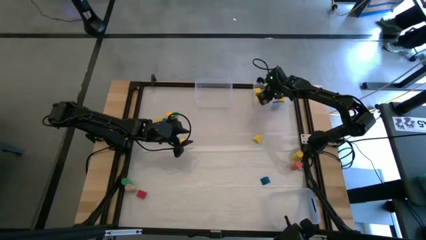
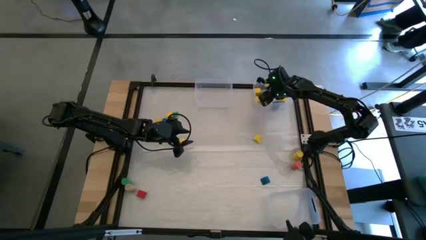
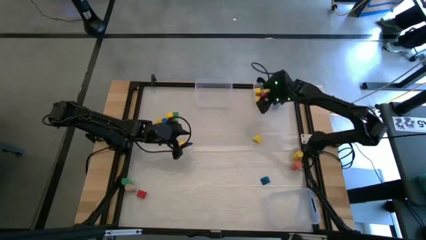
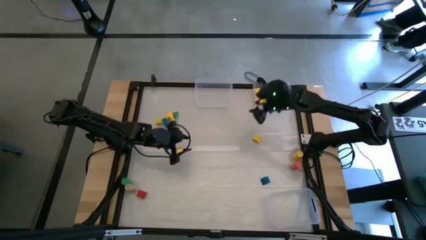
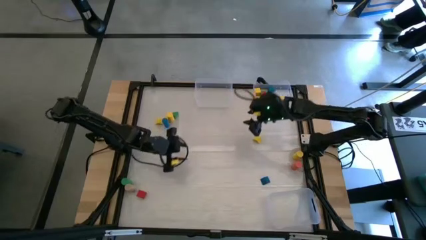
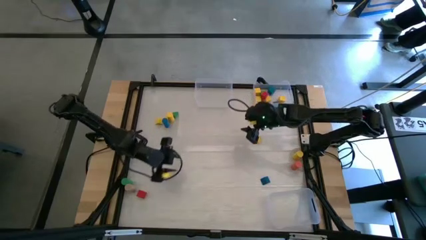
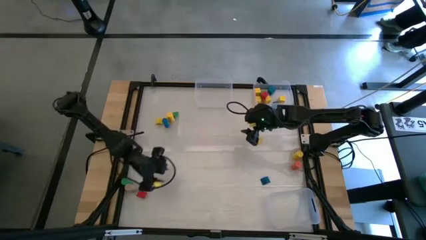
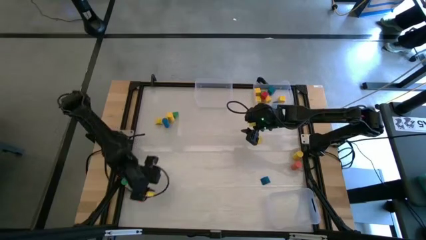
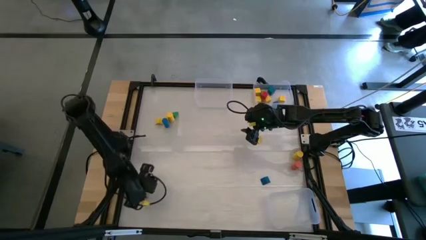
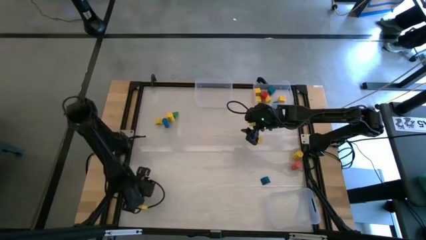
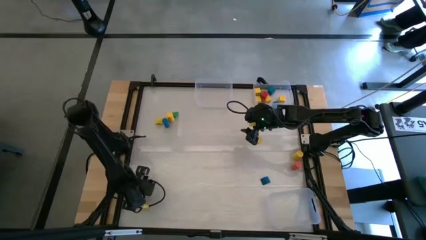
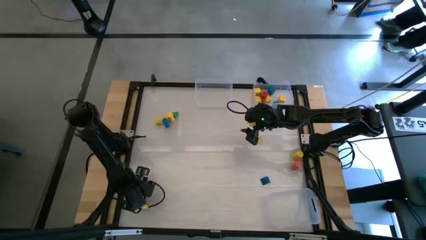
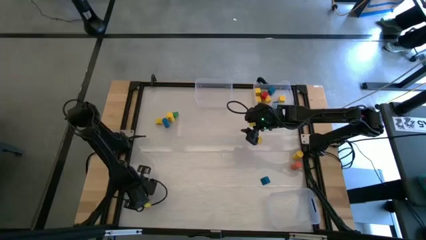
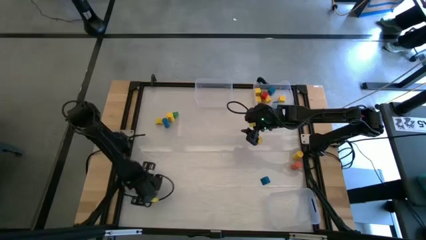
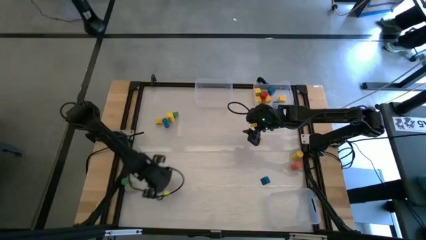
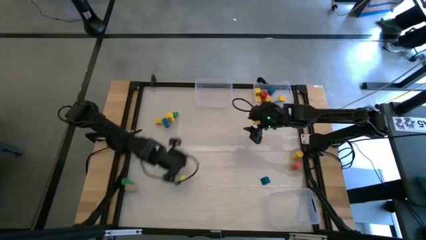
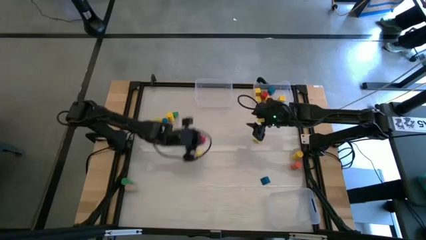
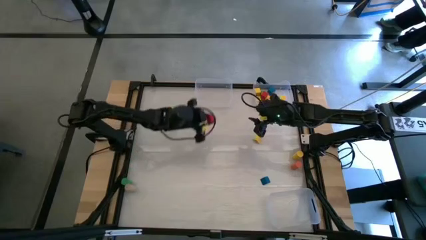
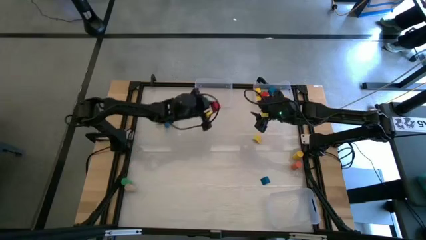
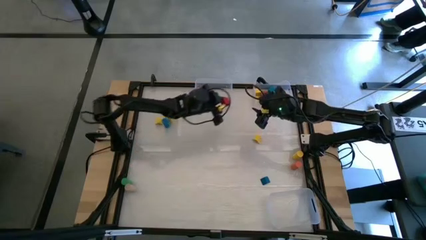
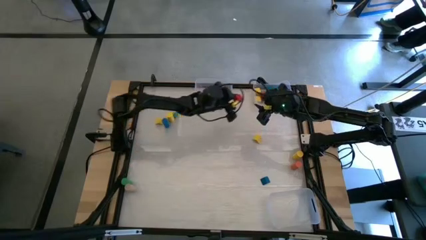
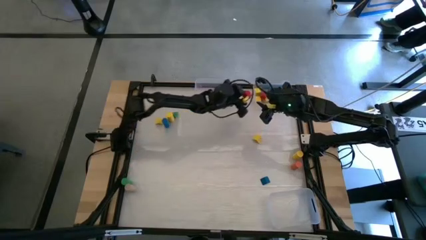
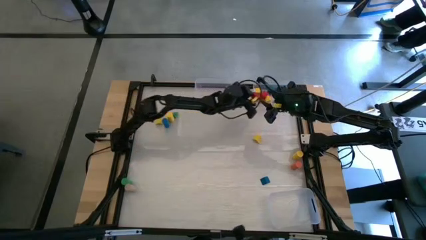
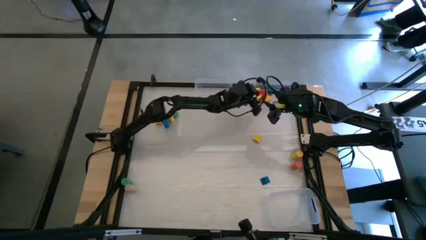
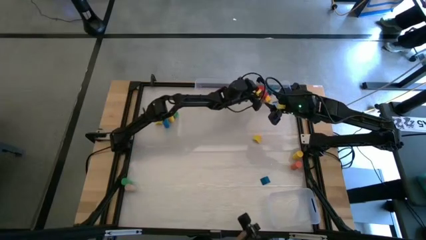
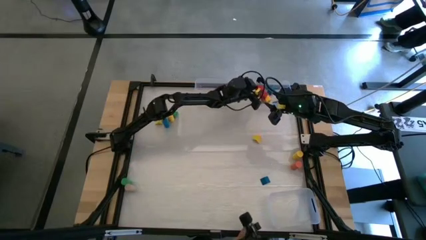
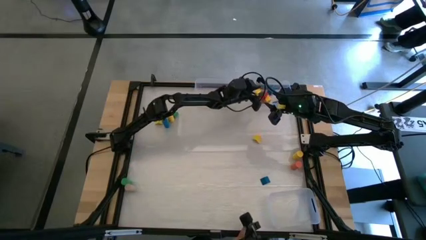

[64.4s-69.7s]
Task: Sort blocks by size
Put the red square block into the top right transparent bin

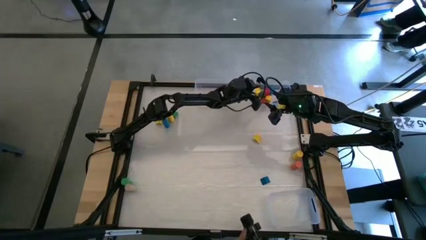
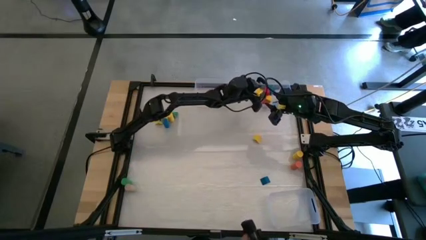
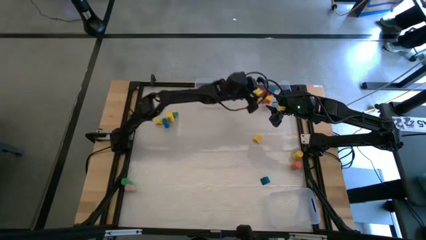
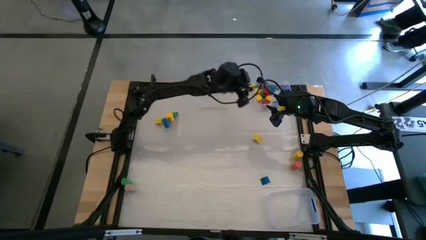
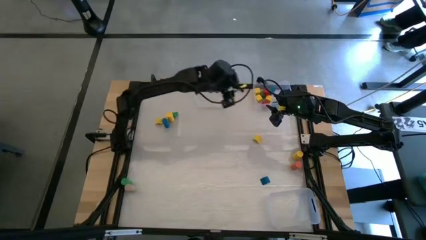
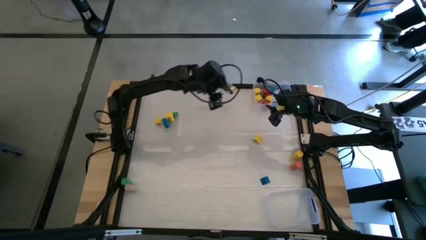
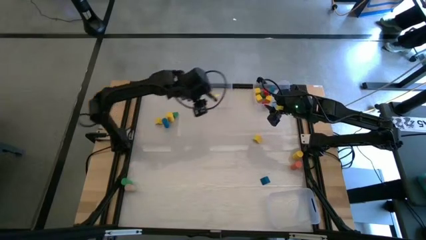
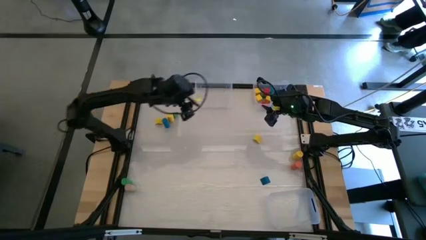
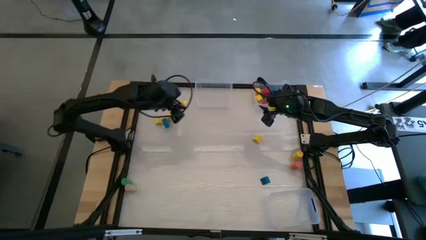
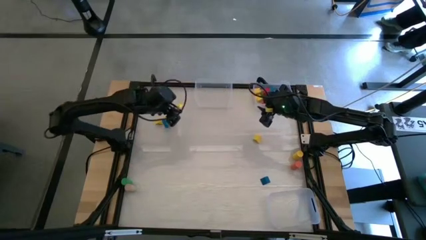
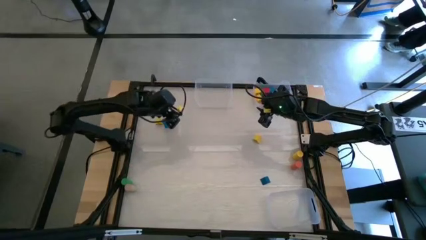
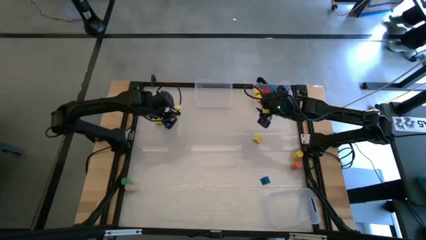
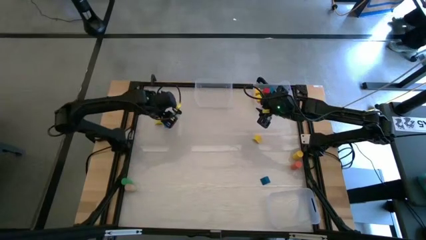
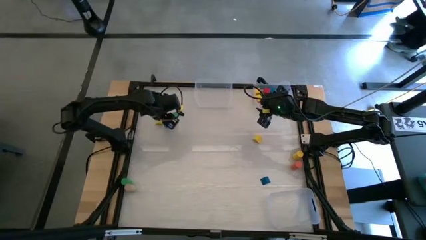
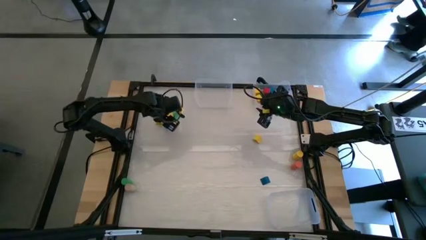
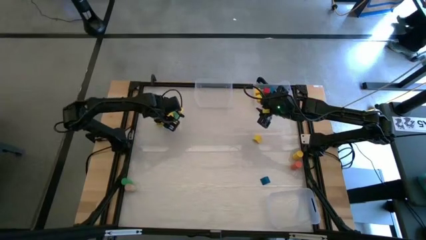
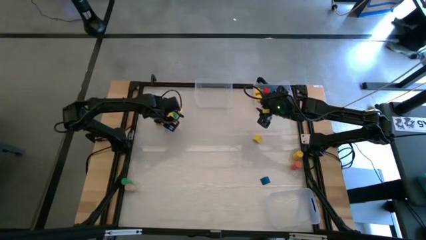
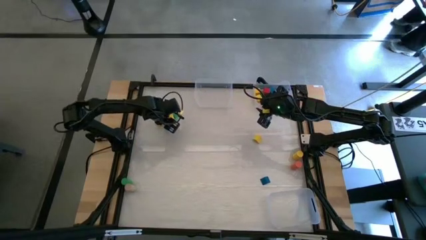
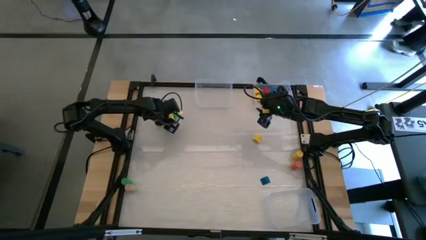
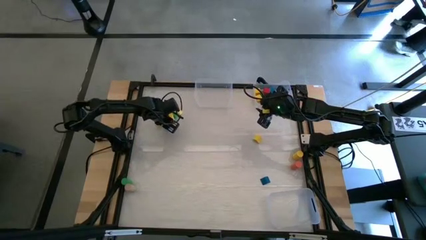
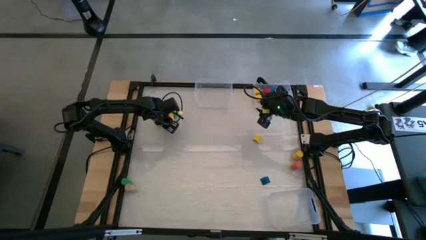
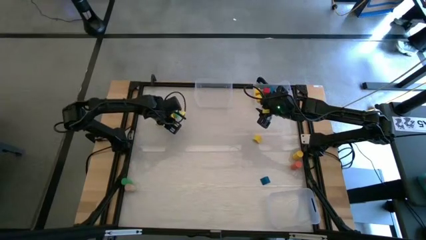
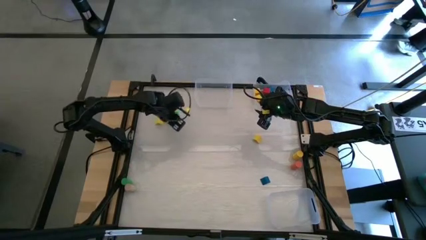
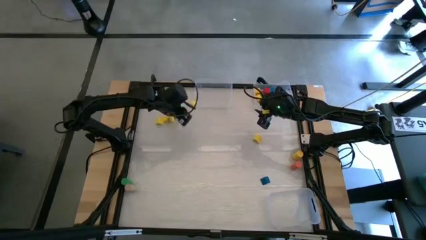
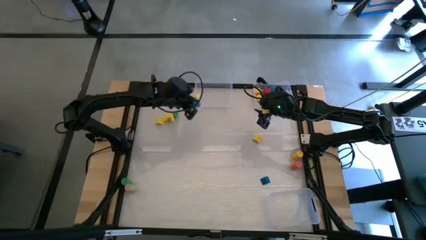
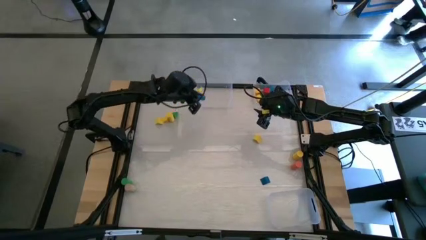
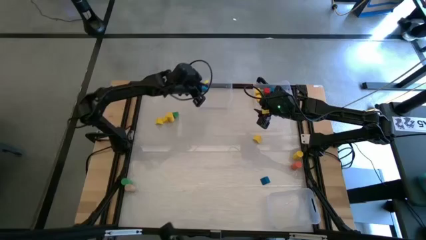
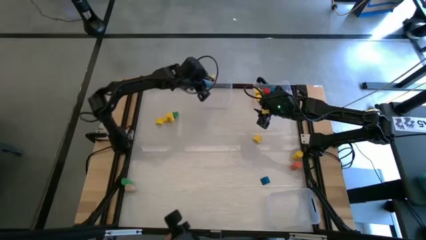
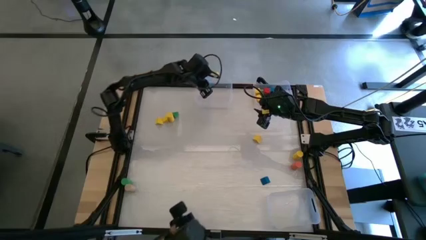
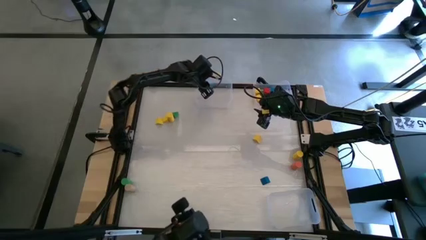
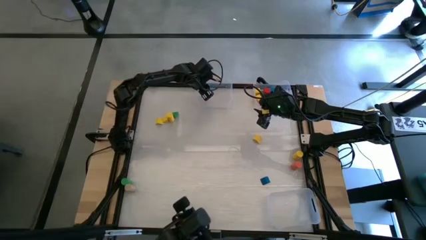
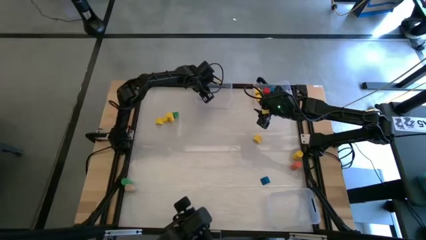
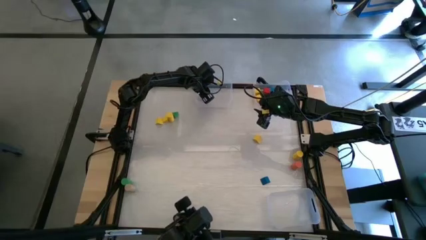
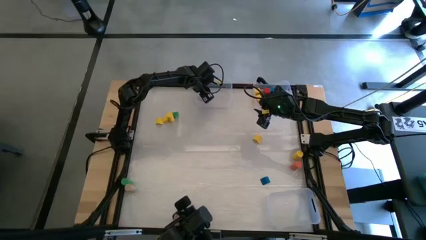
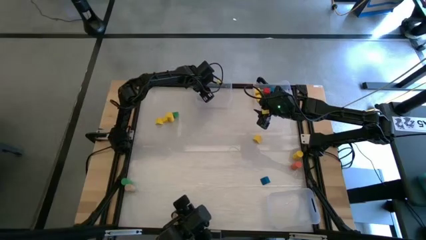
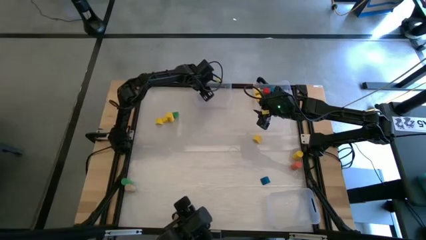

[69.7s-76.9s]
Put the blue cylindrical block into the top left transparent bin

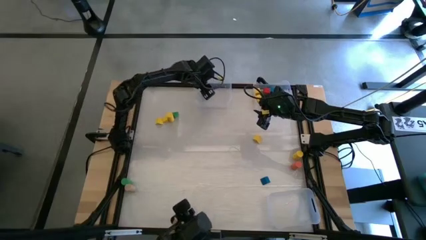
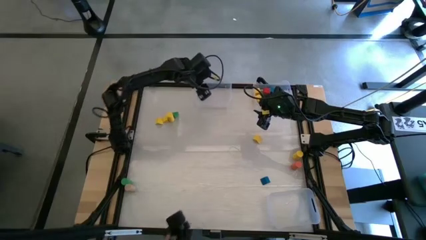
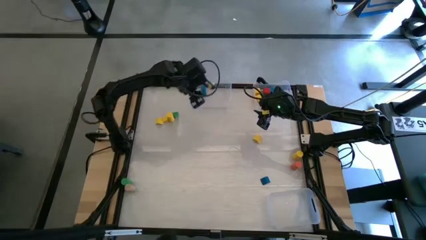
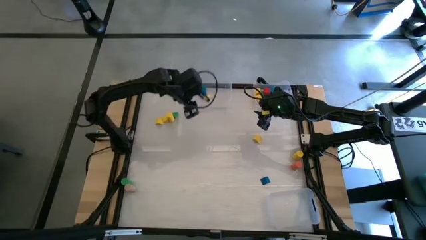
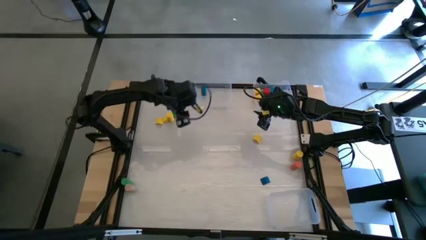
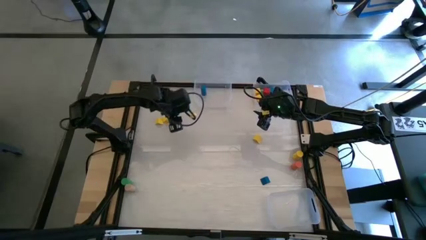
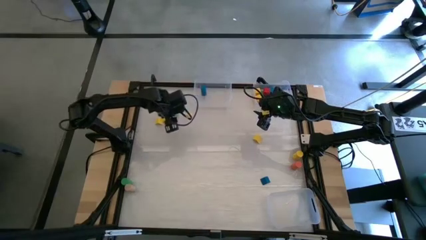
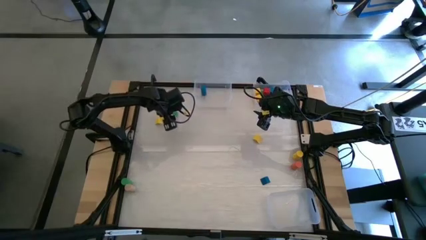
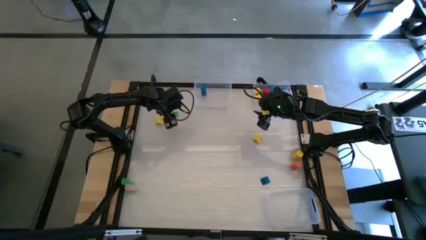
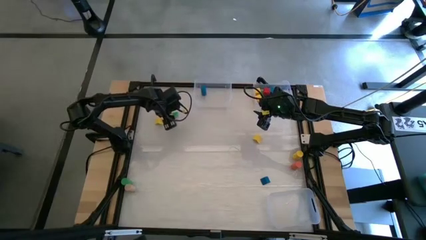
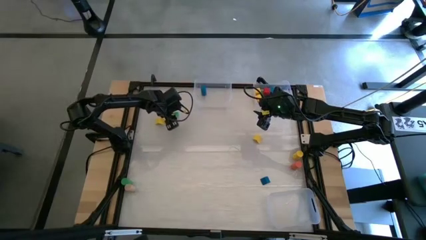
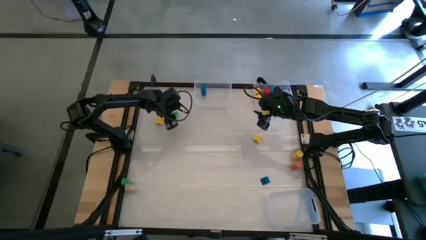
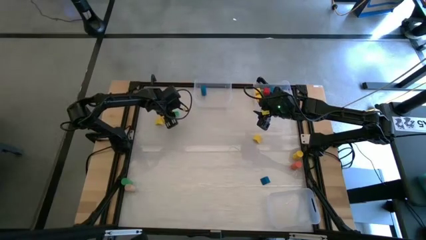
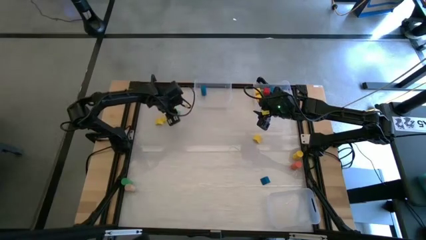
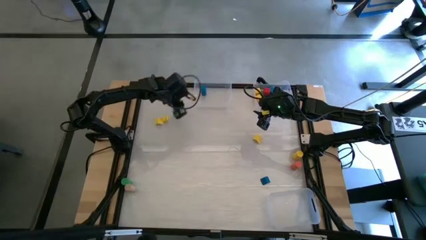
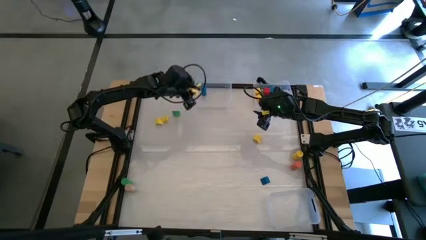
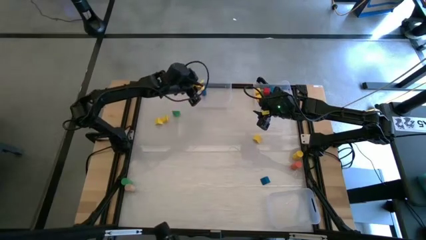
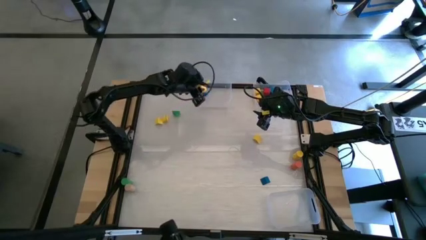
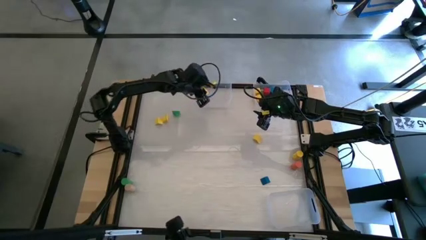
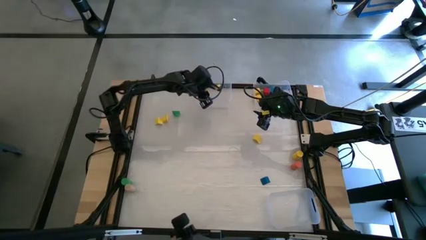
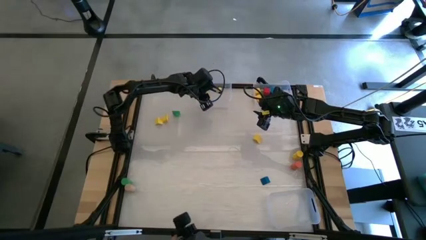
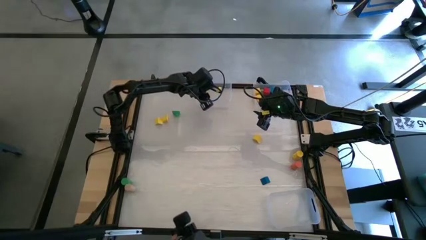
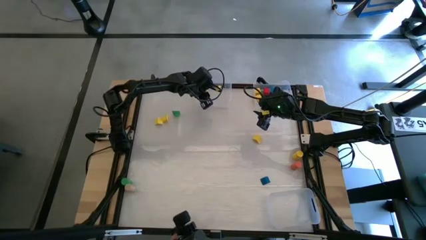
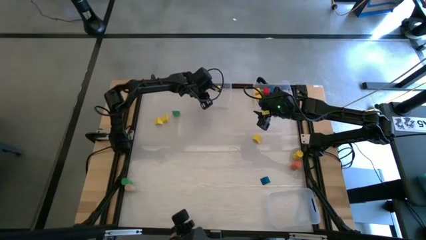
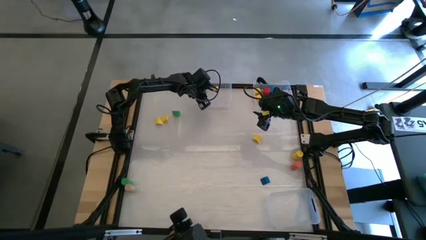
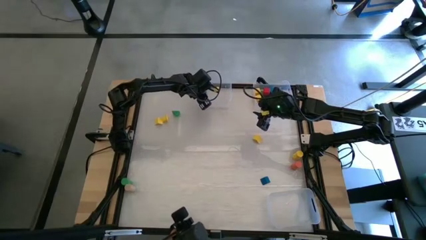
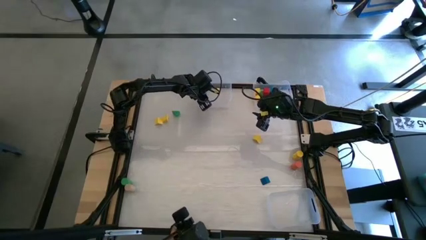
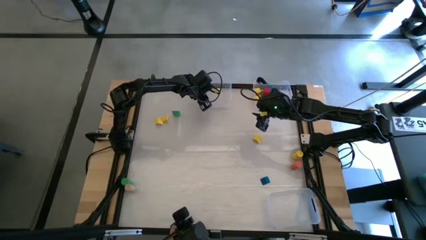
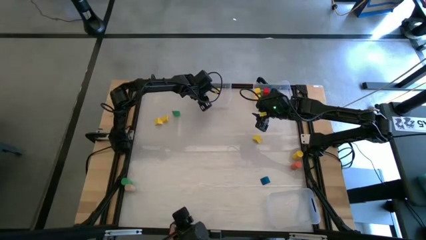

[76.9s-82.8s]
Put the yellow cylindrical block into the top left transparent bin
